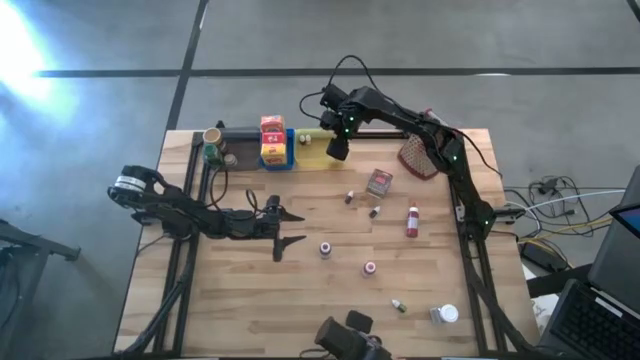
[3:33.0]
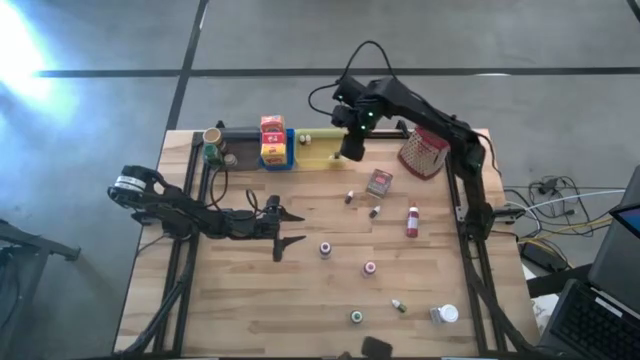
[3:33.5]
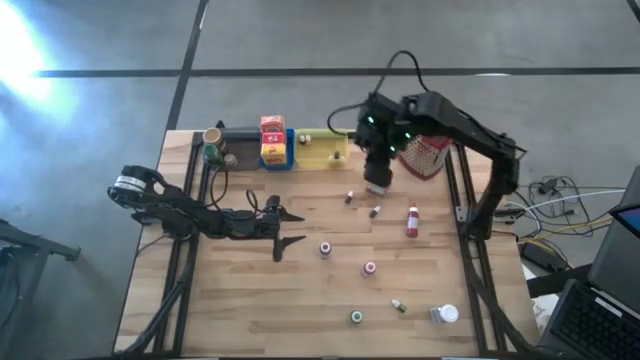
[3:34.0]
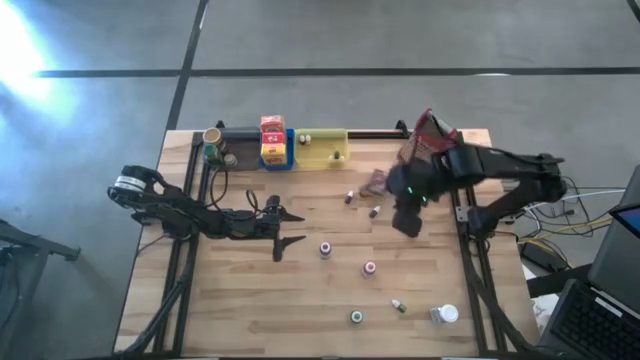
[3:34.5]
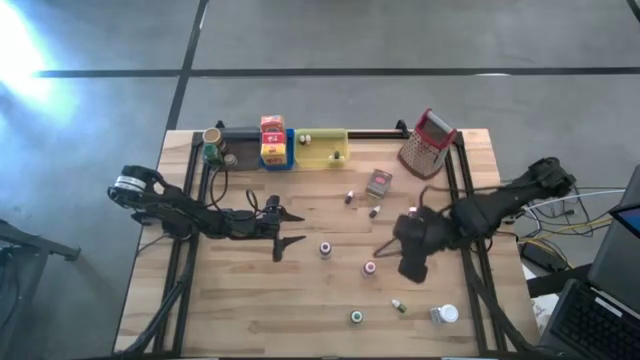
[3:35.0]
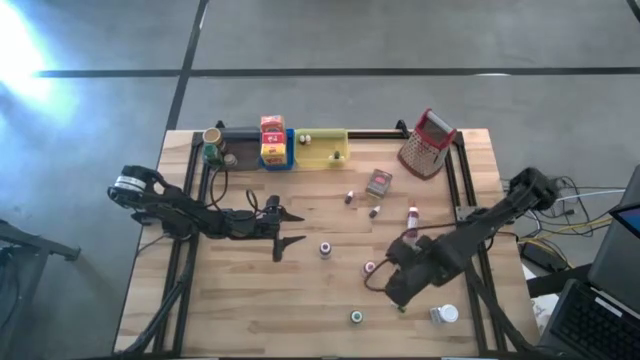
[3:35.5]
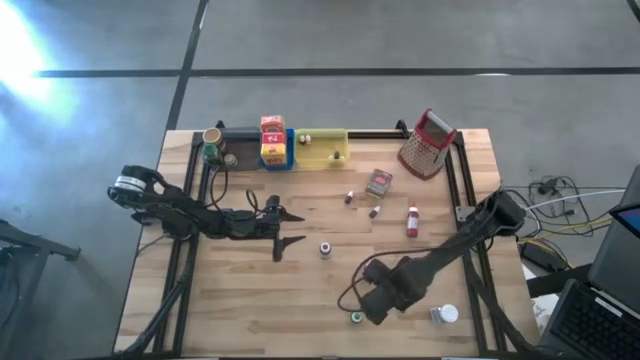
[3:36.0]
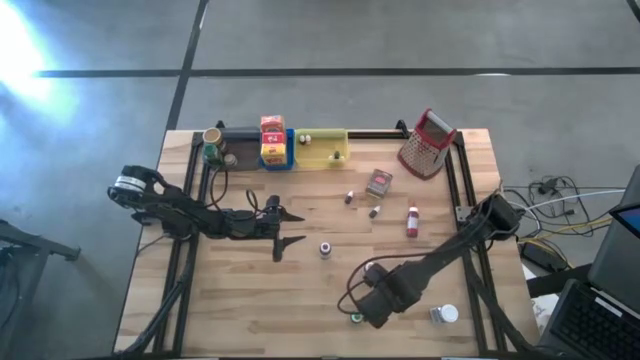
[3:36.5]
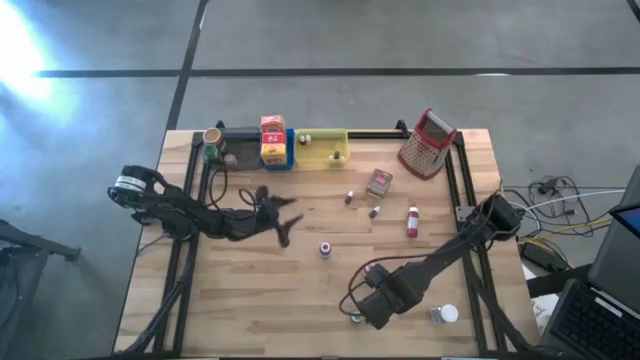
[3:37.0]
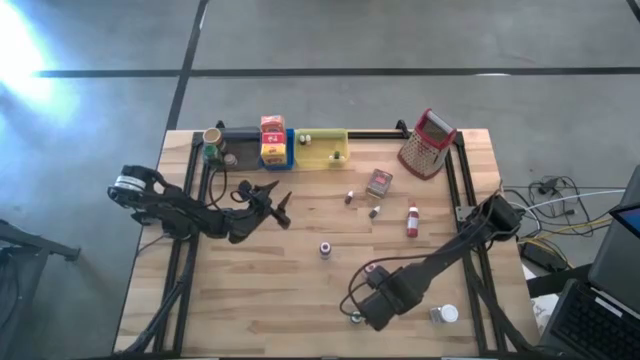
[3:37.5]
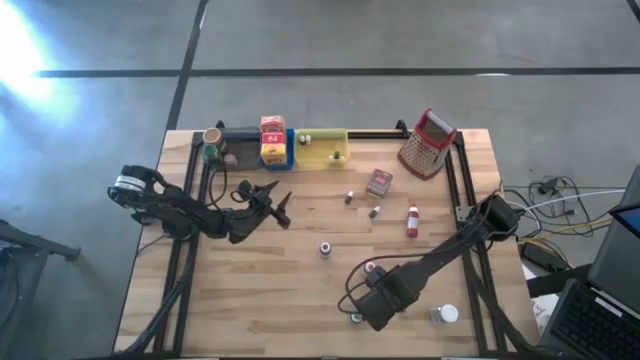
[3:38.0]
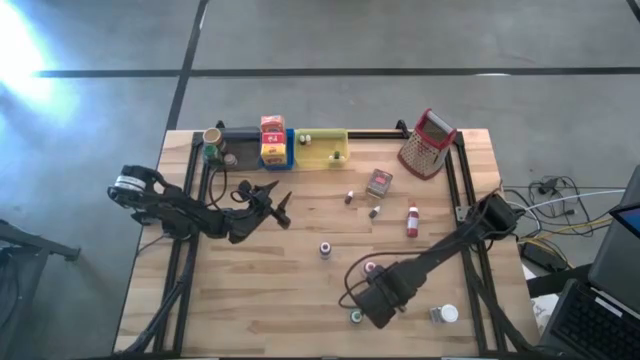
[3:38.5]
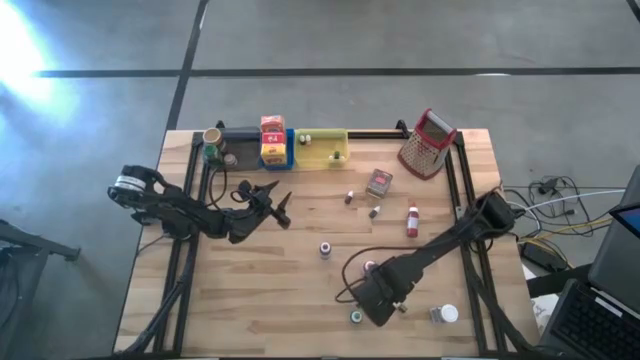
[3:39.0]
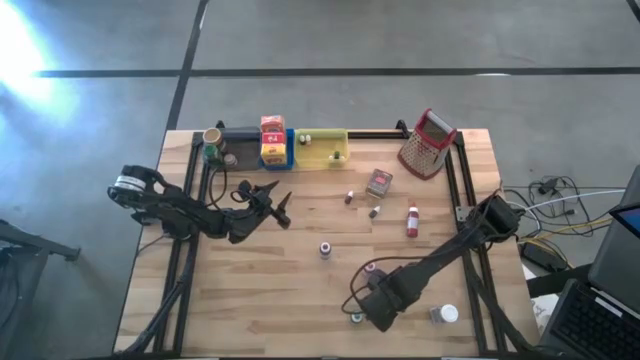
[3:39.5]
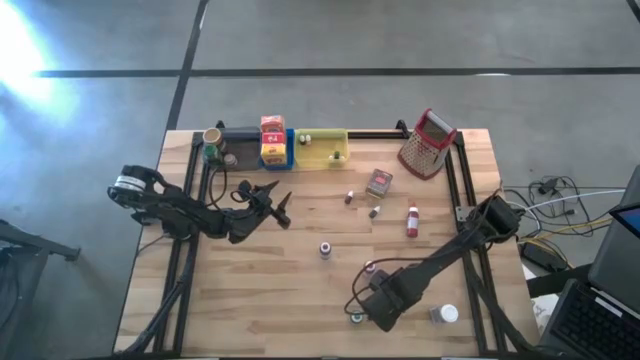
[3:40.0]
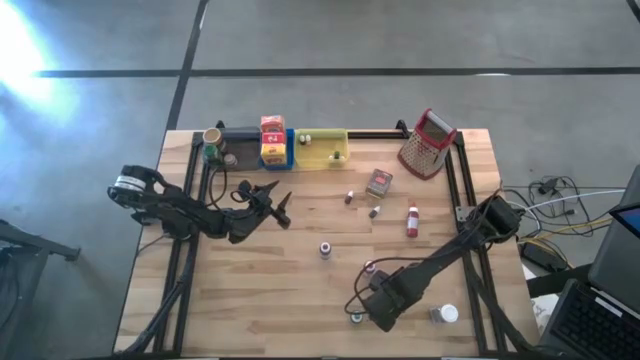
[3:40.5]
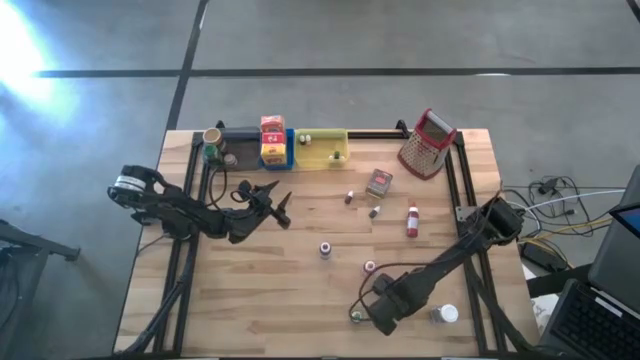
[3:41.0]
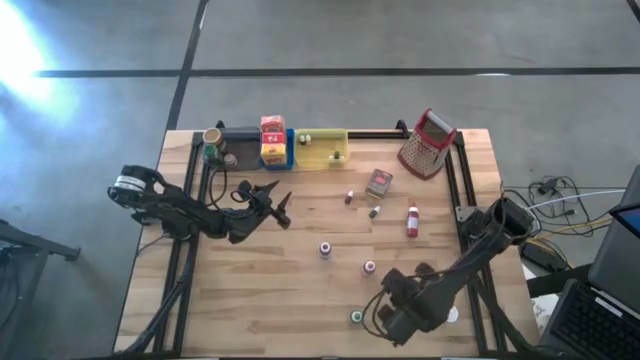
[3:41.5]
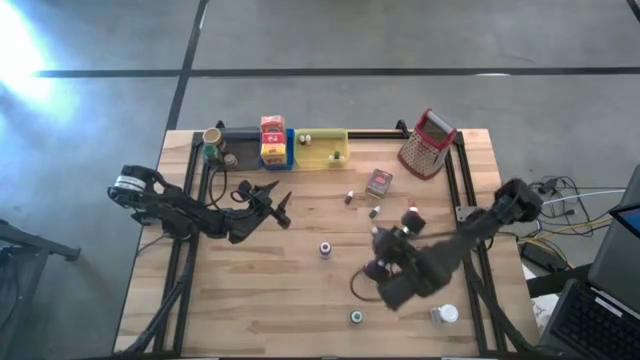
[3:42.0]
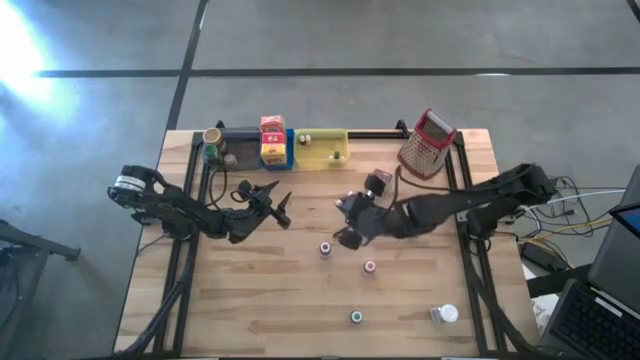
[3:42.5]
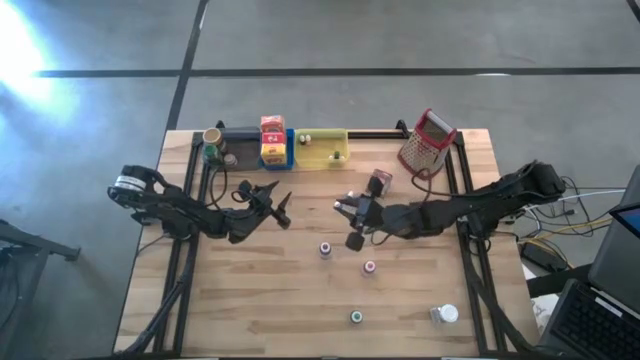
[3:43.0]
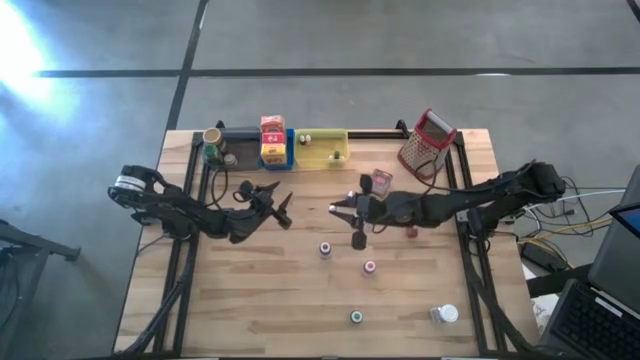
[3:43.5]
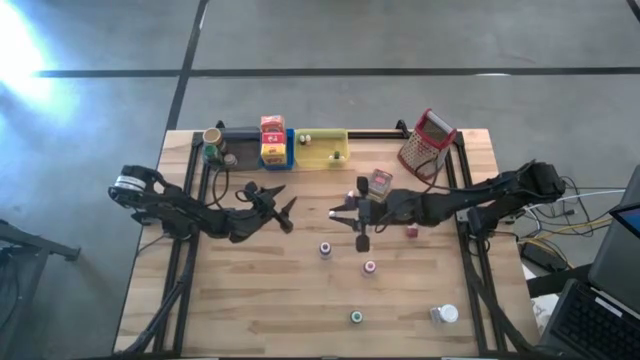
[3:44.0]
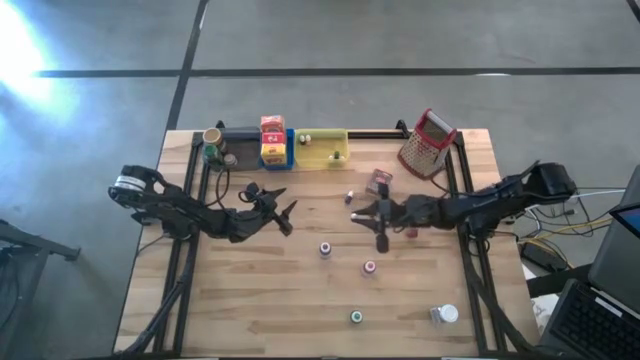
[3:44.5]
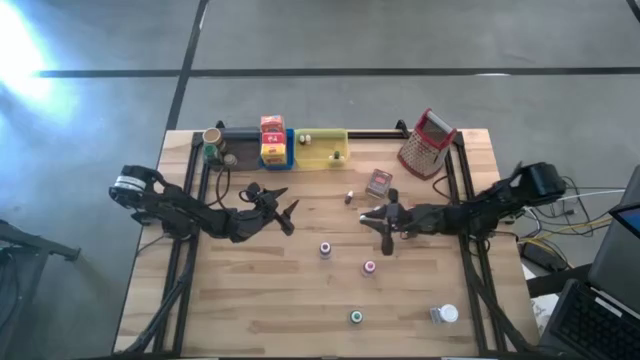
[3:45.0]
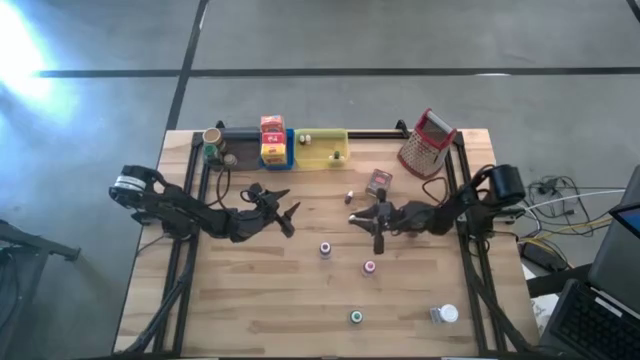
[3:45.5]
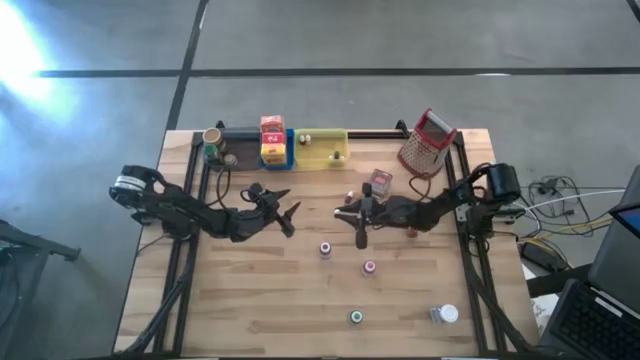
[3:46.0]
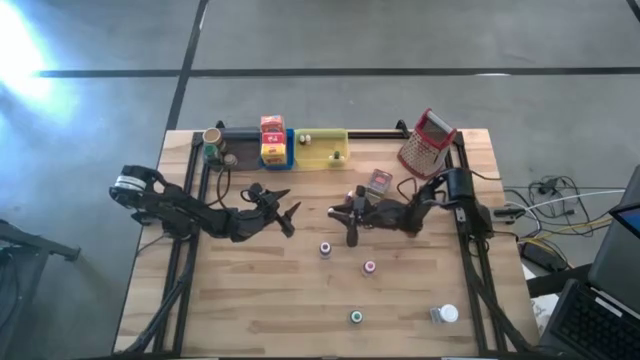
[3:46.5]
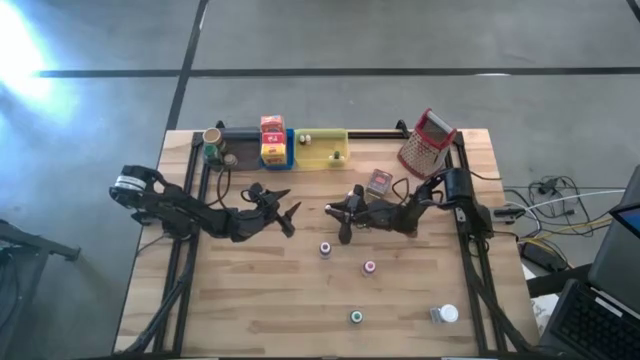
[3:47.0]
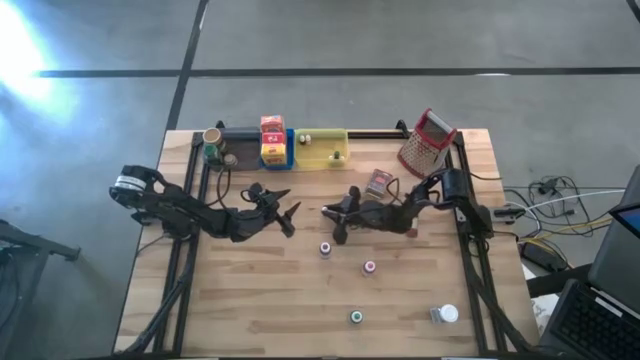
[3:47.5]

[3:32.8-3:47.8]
Task: Pick & Place Kitchen Items
Put the small light green food coloring bottle into the yellow bin

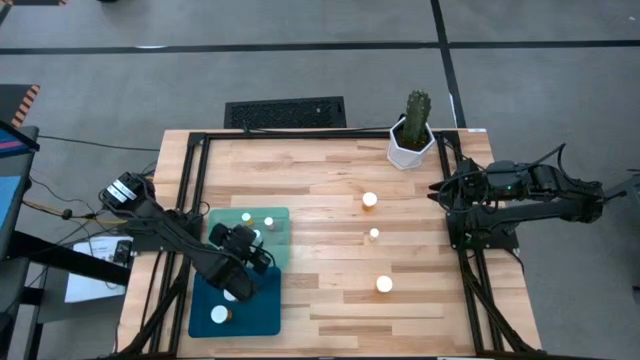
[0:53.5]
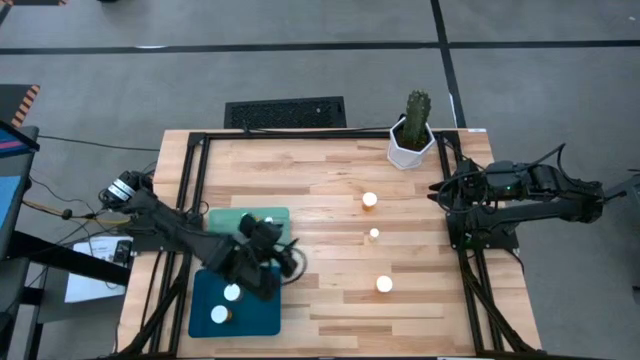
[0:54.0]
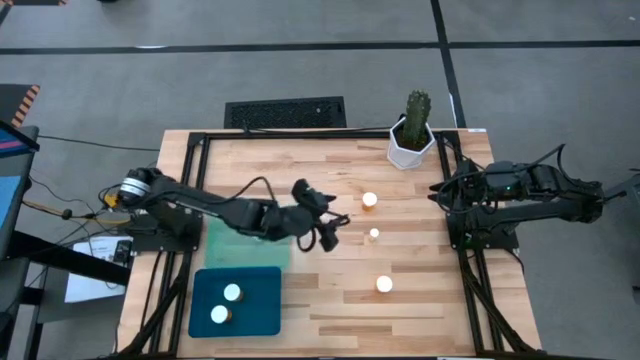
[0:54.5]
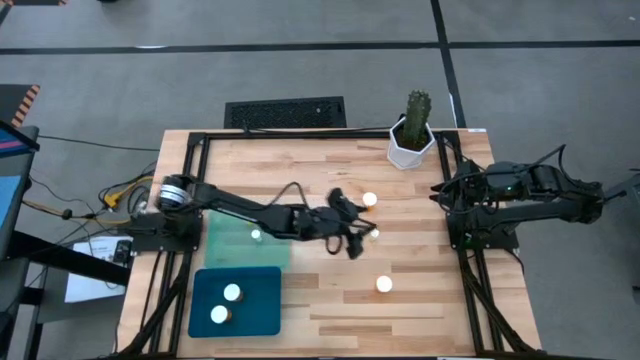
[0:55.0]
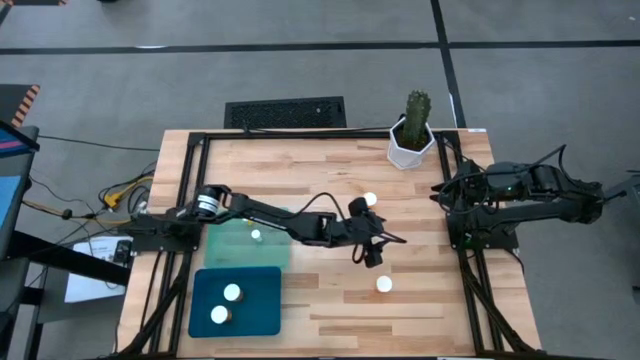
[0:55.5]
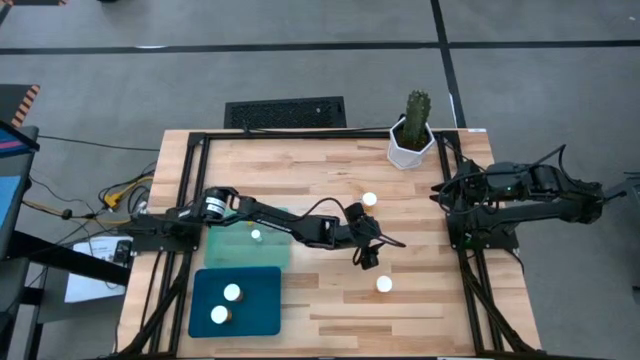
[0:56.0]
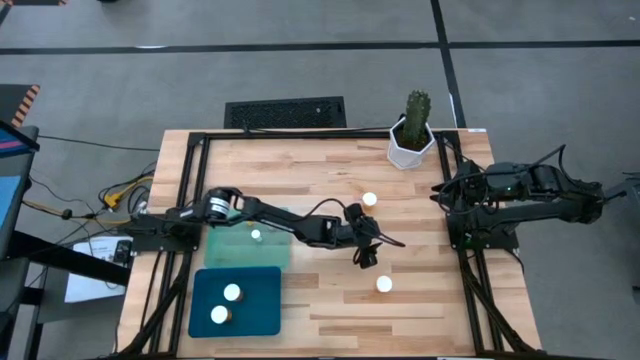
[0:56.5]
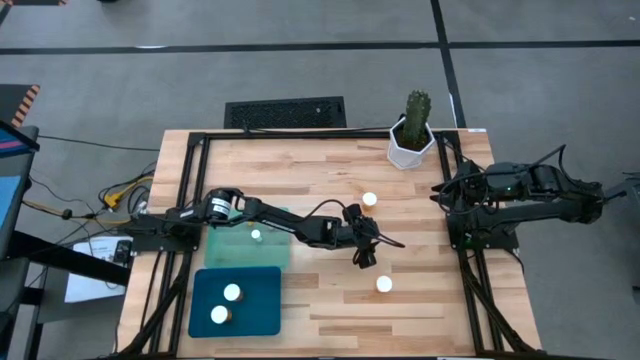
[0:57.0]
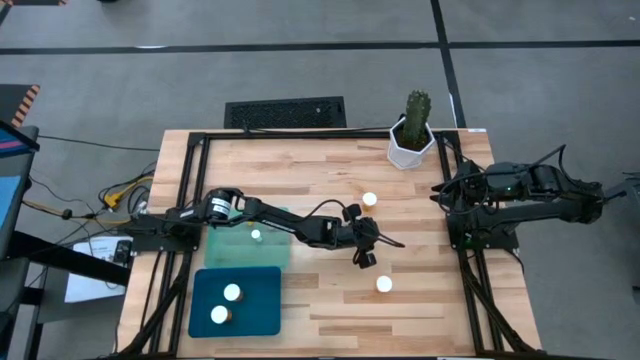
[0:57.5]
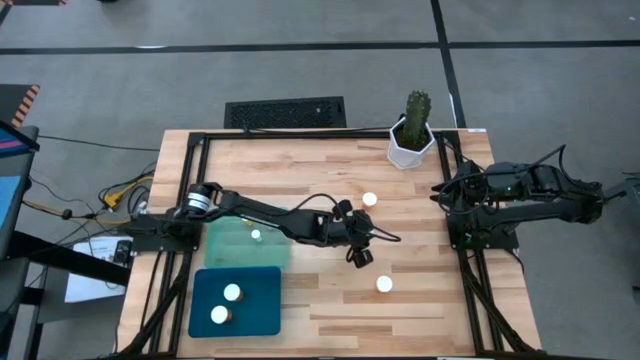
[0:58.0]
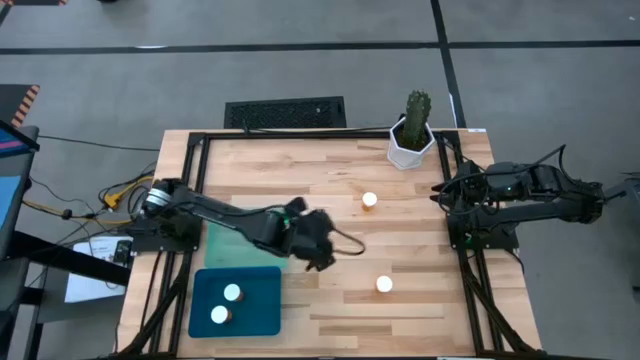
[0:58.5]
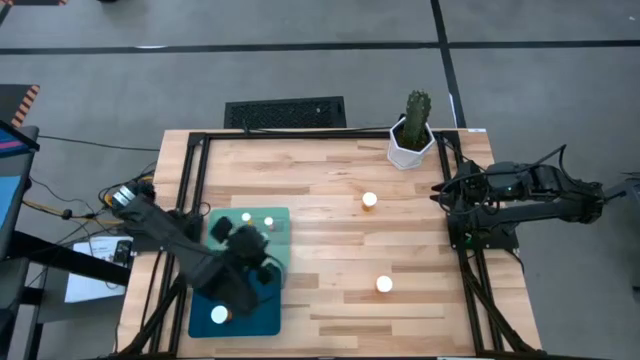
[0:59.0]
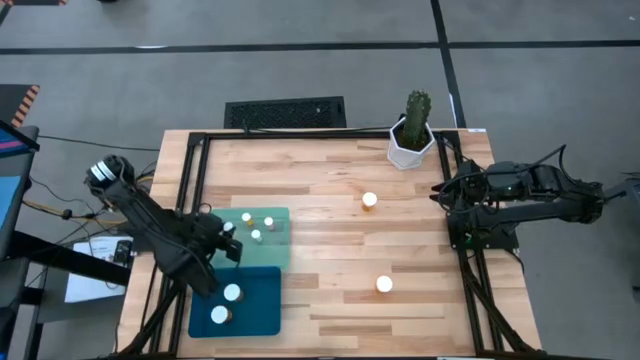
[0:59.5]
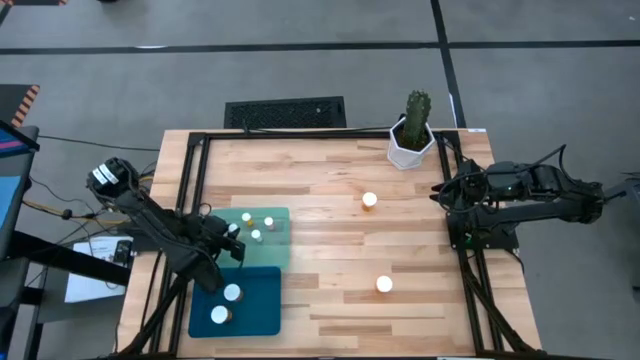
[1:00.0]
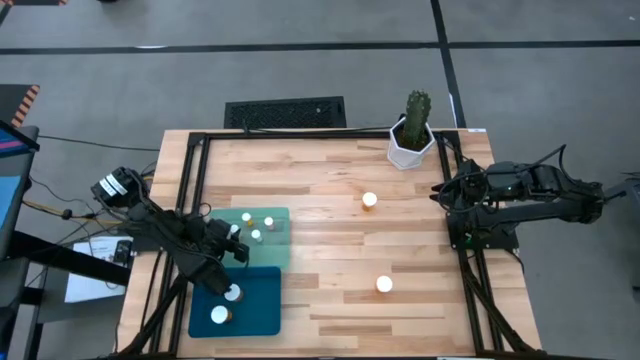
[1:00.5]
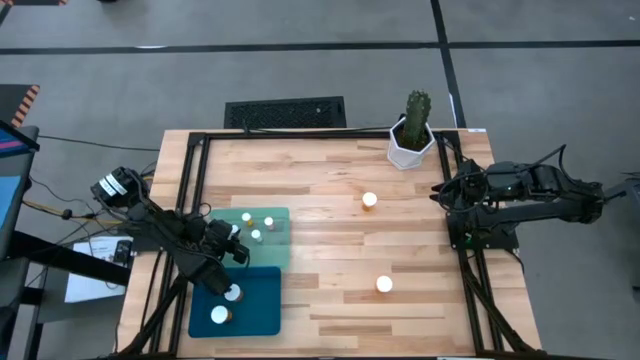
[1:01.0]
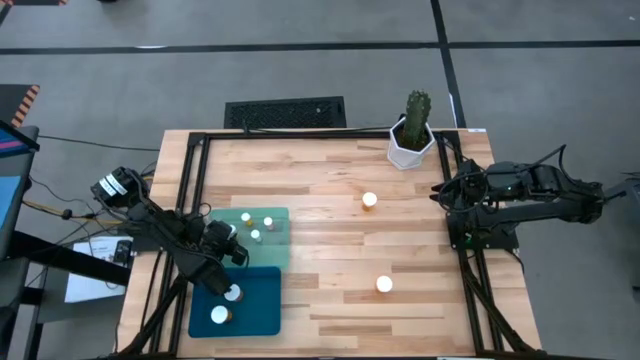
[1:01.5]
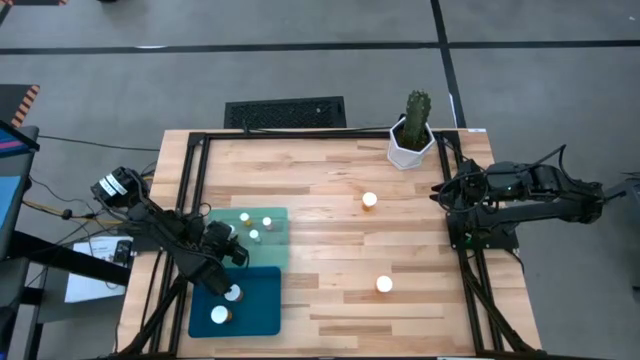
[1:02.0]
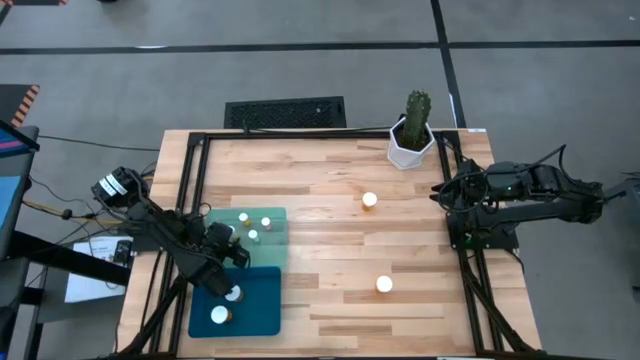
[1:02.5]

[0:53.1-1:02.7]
Task: Pick and place medicine bottles into bin by pill shape (circle, oval)
Put the small yellow pill bottle into the green bin
